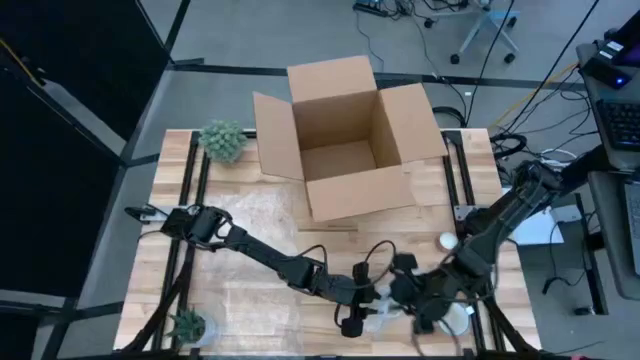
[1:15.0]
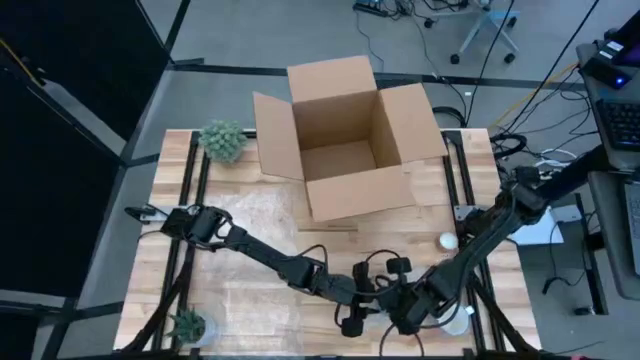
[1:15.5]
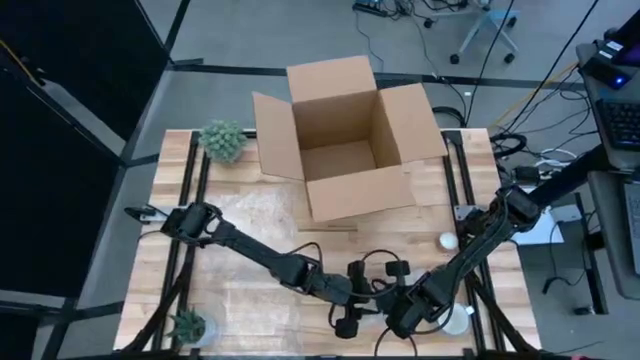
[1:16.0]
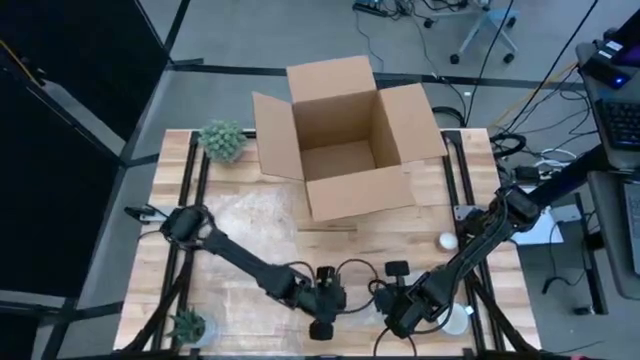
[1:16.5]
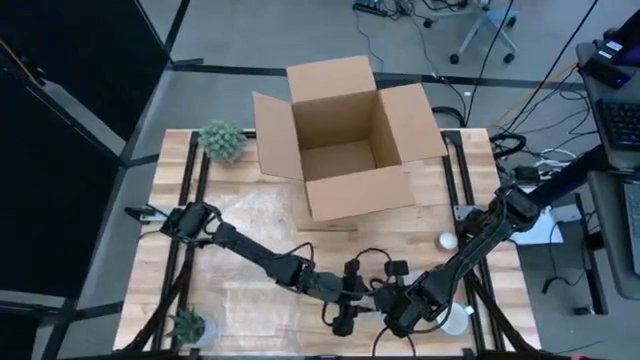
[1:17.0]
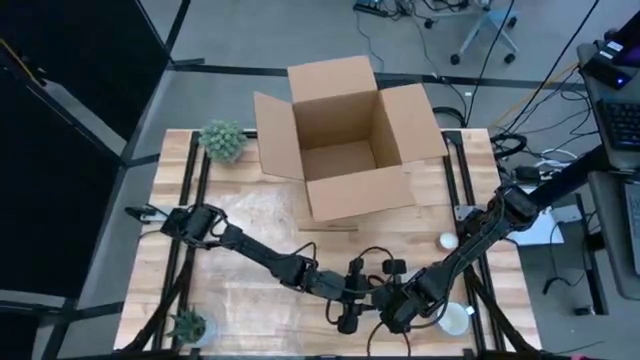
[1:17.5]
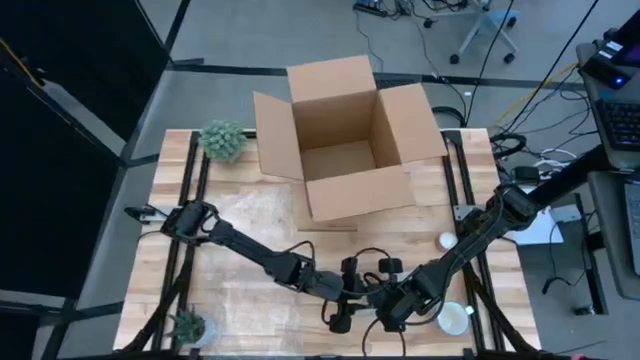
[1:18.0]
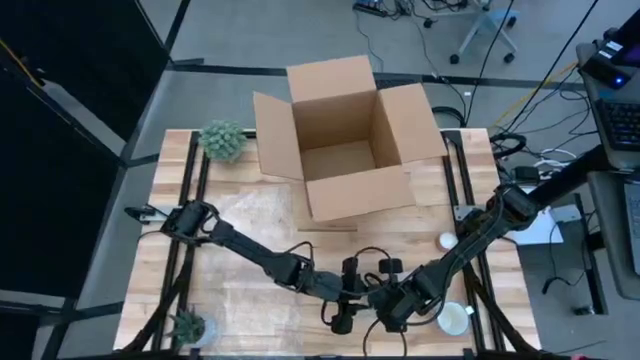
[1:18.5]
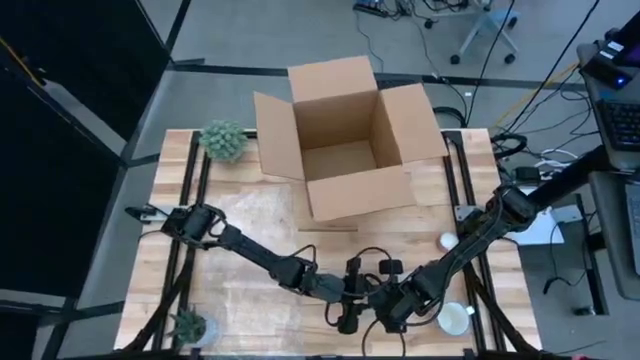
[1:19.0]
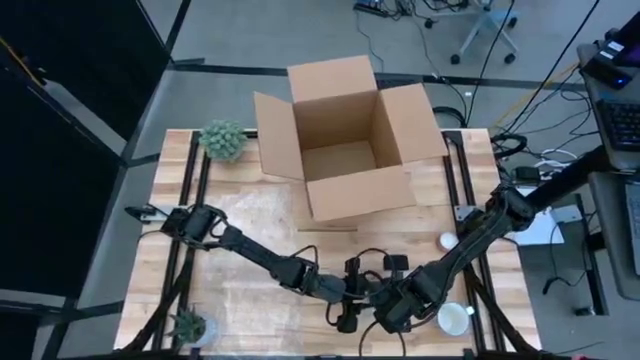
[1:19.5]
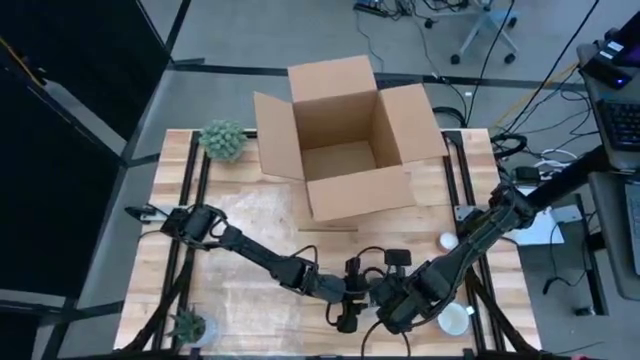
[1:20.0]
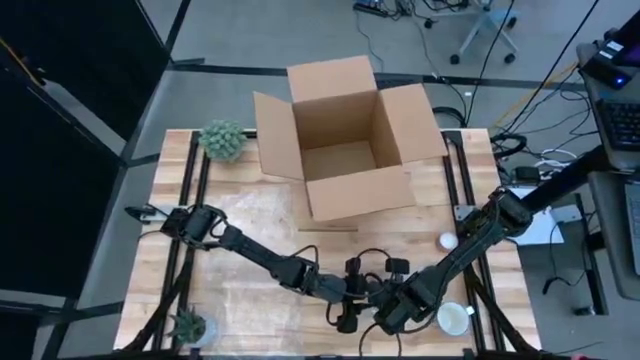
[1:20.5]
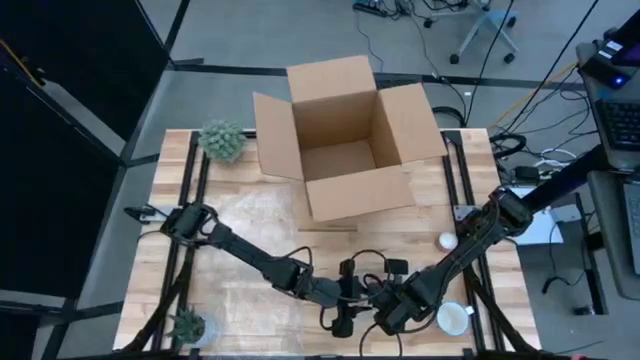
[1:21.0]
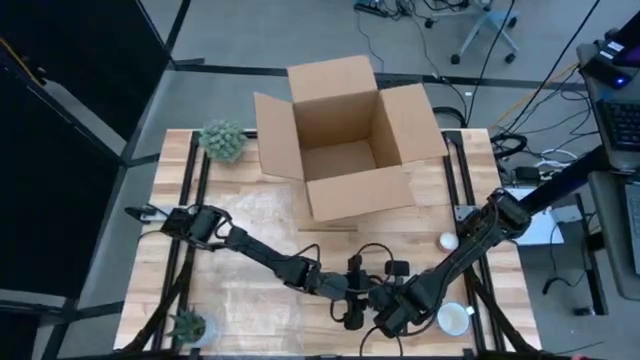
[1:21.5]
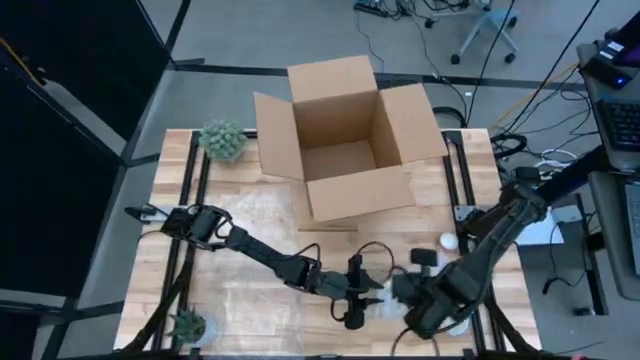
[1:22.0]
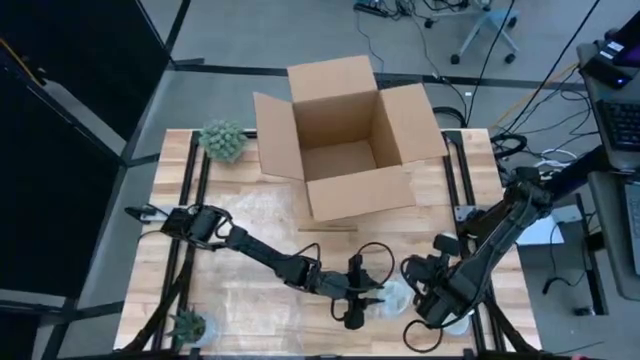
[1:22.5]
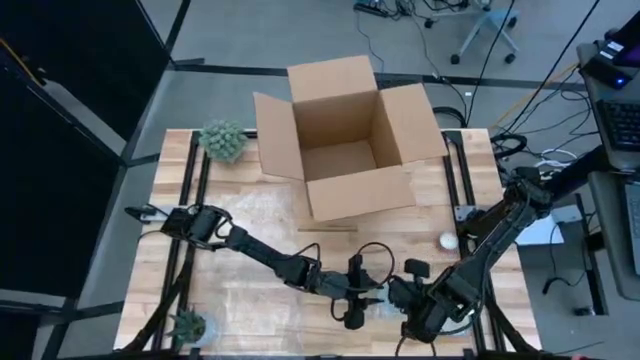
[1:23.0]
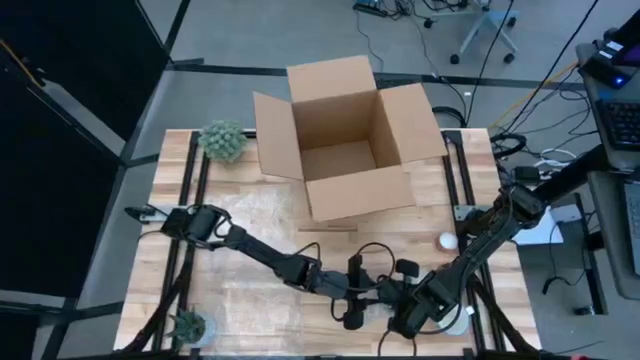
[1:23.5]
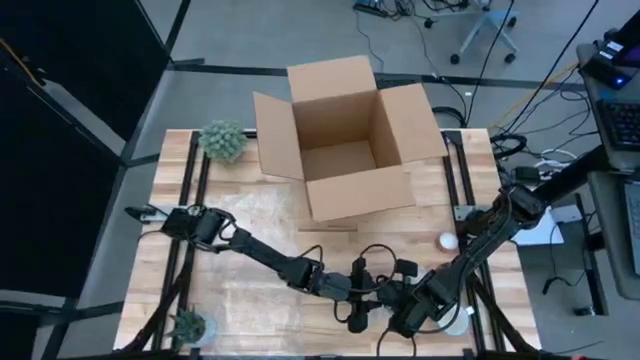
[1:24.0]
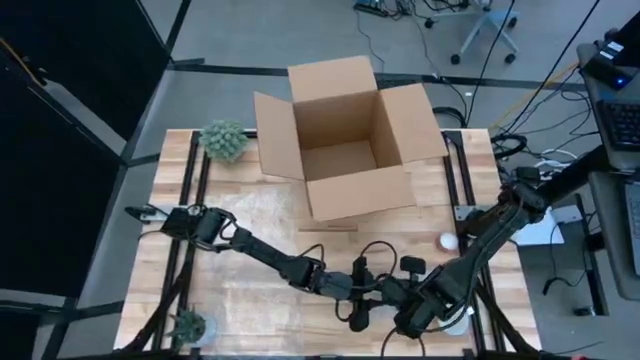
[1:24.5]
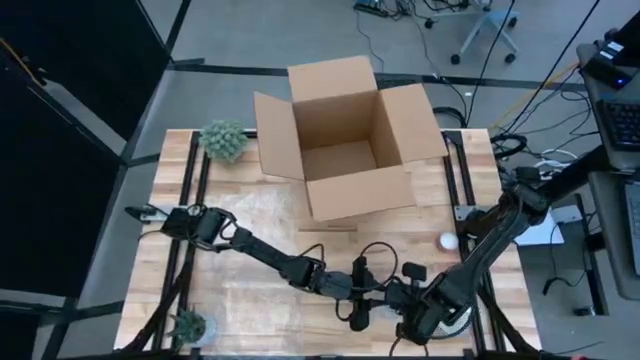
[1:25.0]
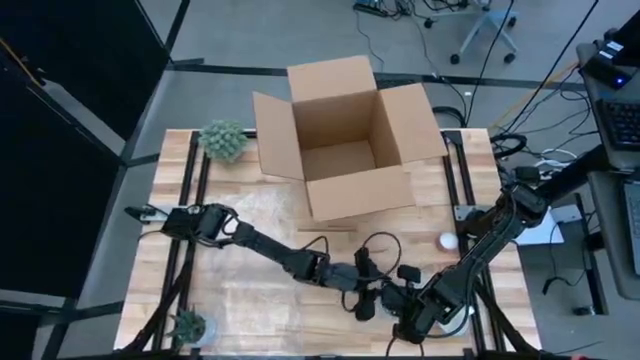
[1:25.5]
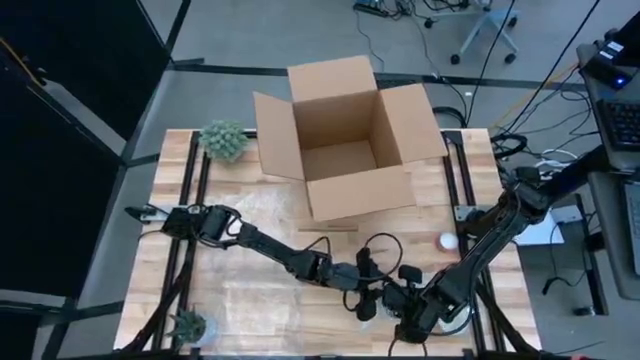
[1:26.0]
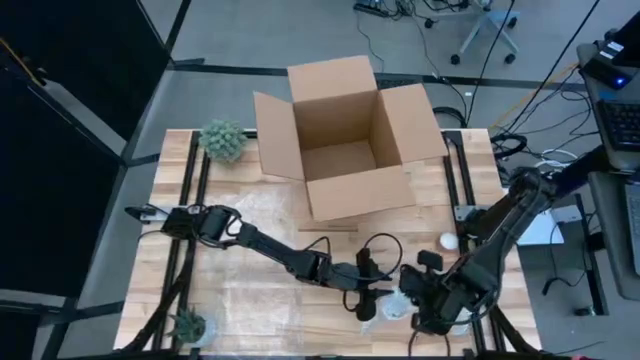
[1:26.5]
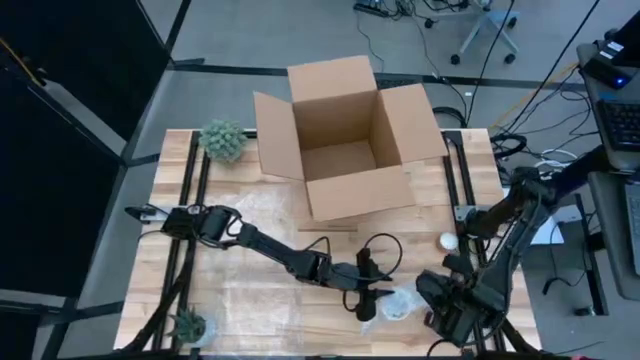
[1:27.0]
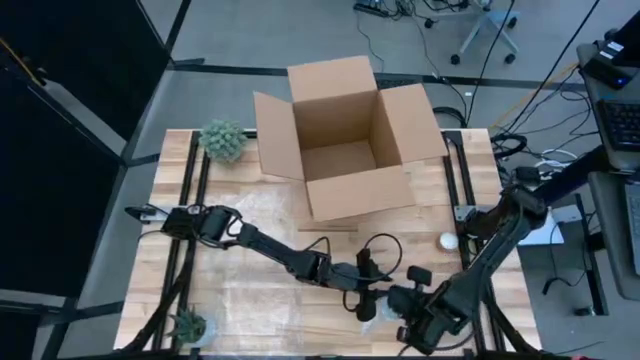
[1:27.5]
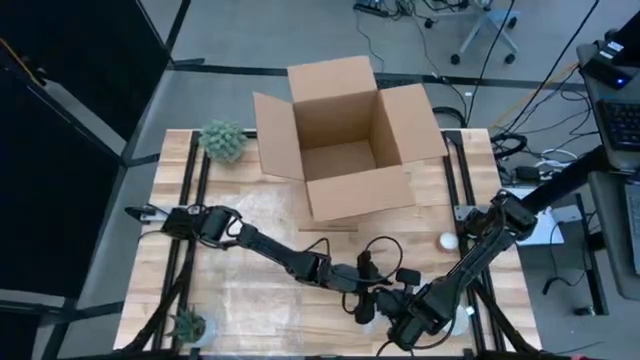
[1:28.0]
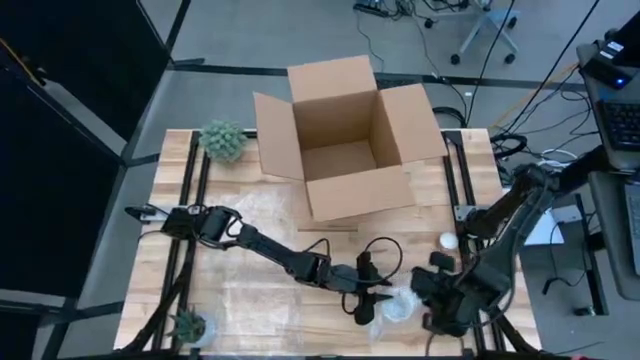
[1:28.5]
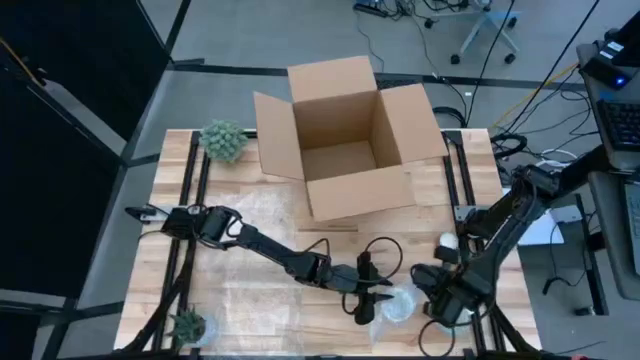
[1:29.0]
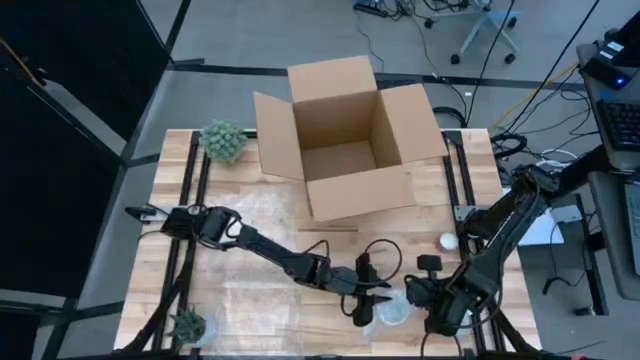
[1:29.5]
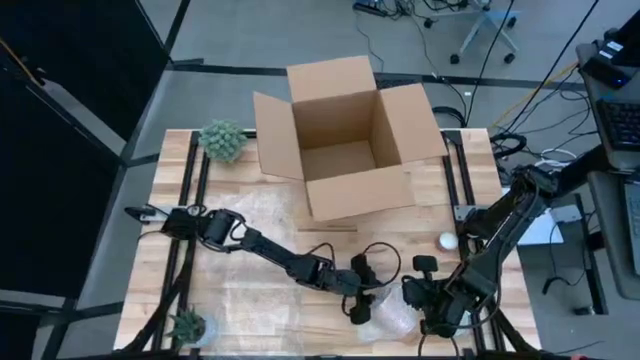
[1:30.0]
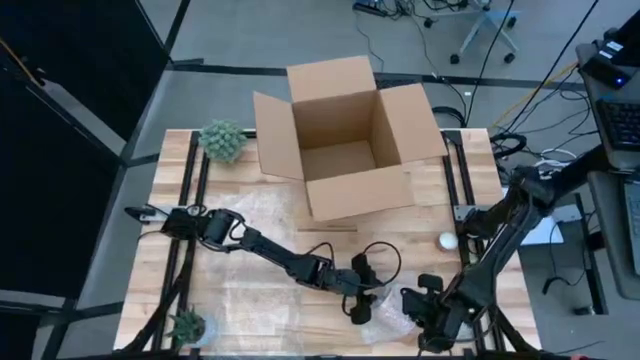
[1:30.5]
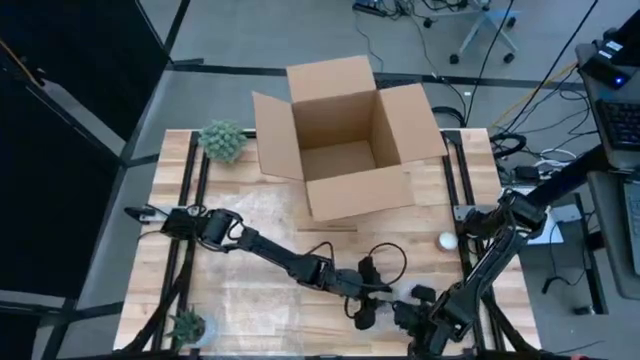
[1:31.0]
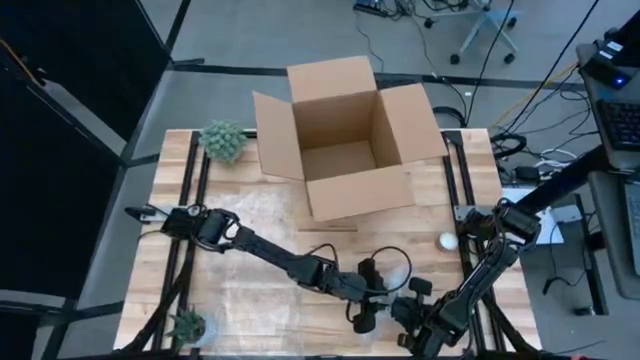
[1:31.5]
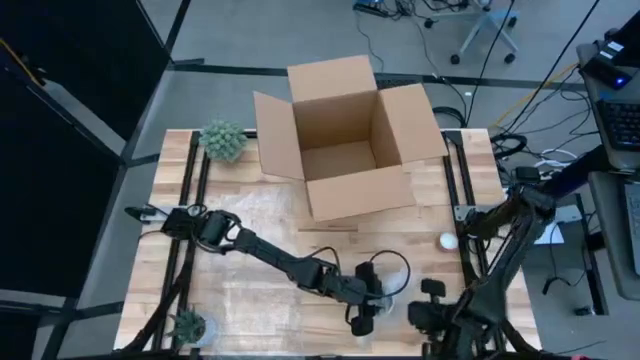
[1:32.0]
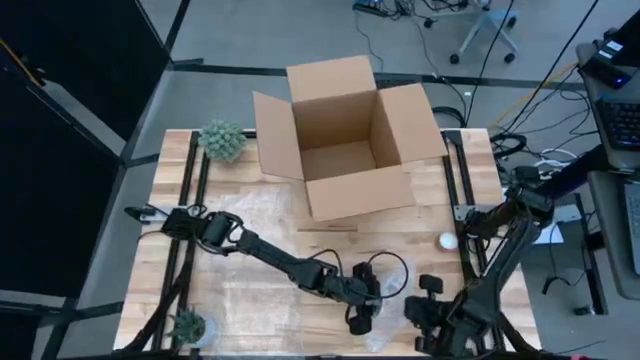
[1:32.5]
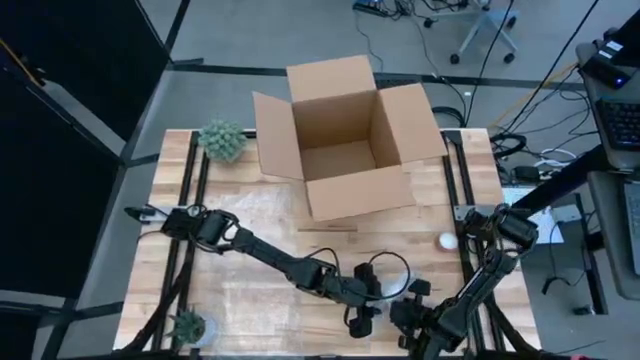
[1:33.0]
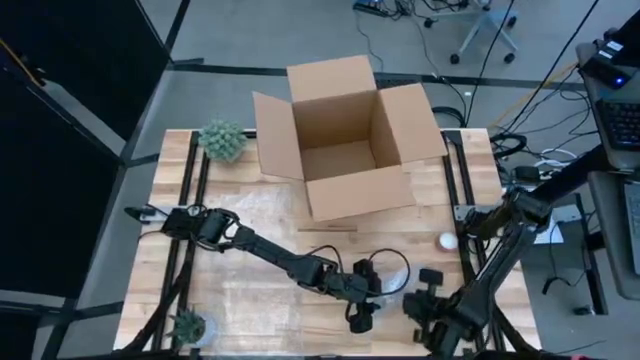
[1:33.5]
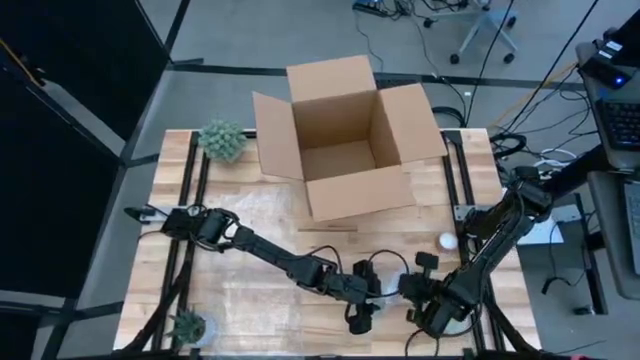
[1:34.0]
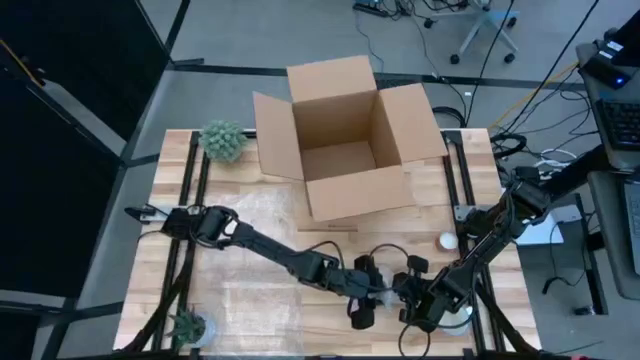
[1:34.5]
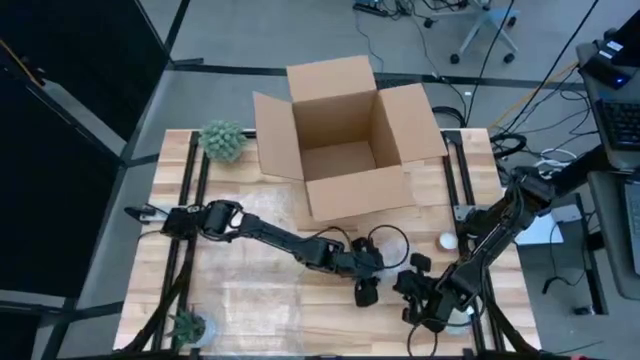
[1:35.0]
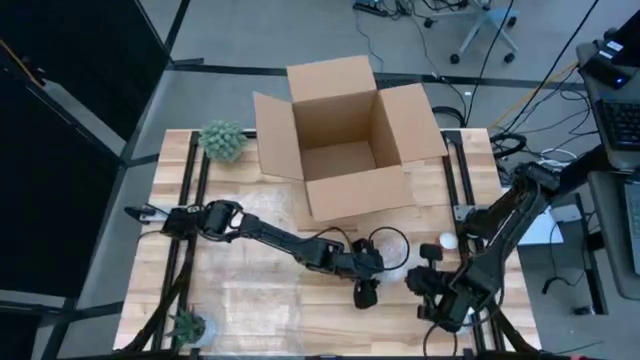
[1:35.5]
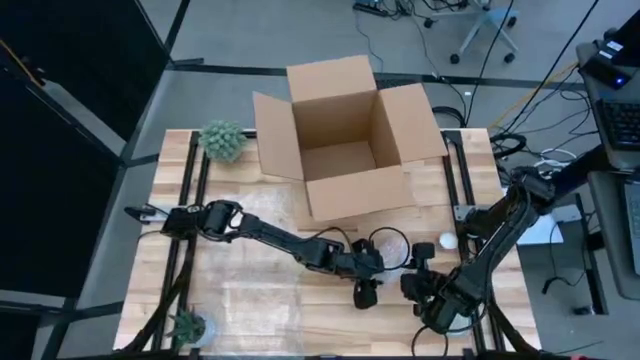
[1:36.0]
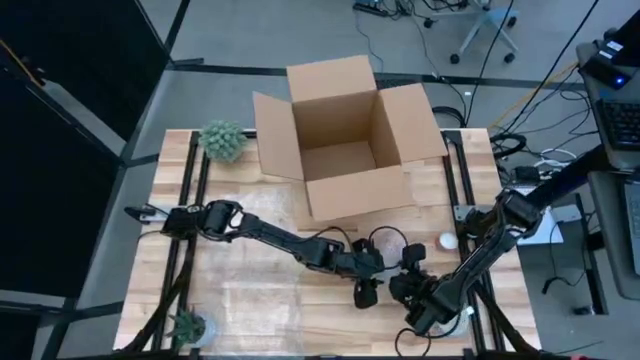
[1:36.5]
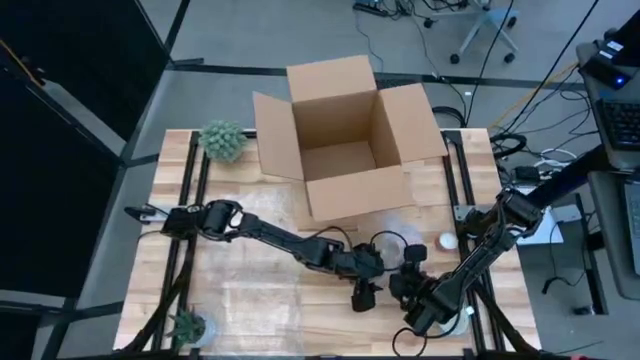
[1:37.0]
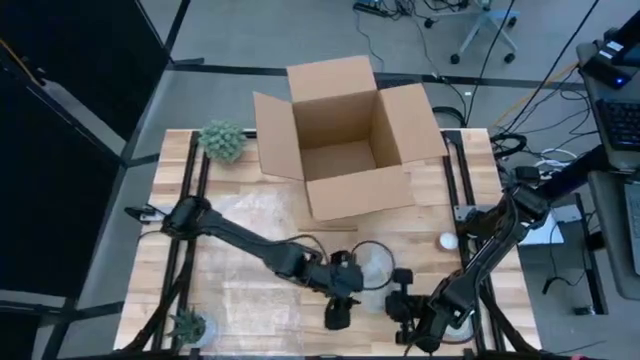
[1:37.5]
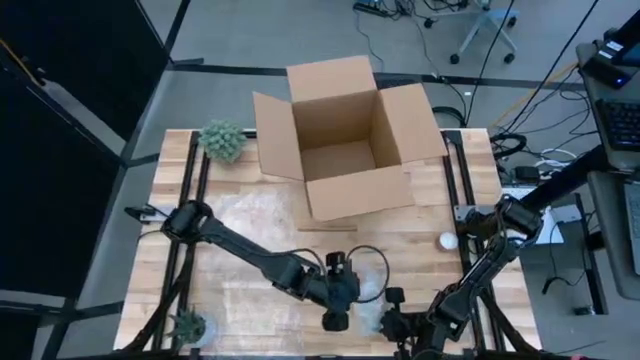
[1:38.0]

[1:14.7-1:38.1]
Task: wrap mug
Wrap the orange mug with bubble wrap
